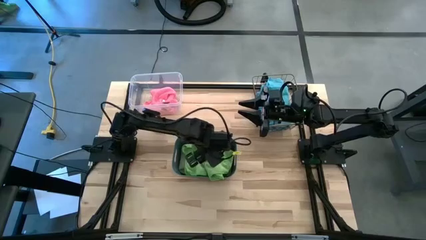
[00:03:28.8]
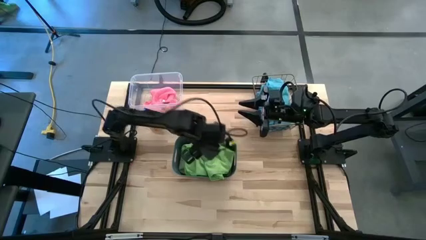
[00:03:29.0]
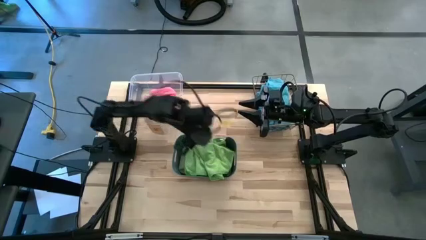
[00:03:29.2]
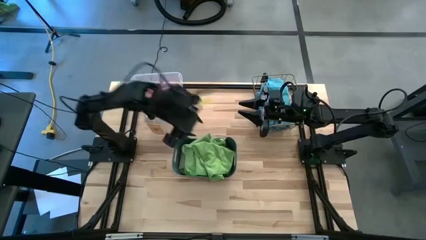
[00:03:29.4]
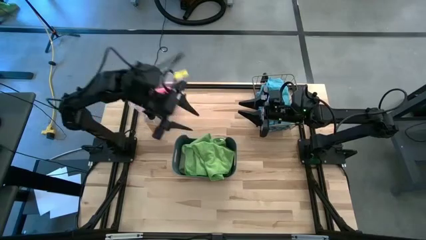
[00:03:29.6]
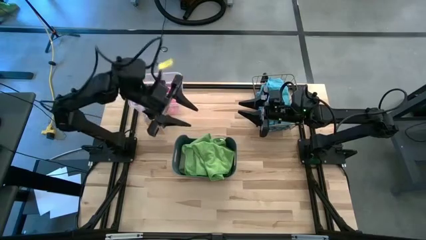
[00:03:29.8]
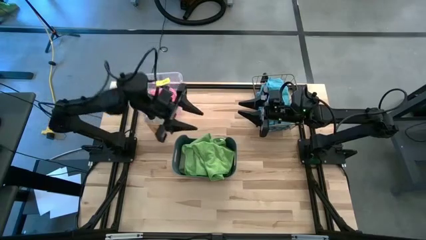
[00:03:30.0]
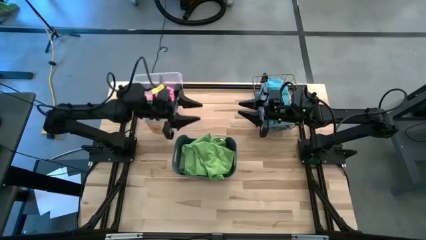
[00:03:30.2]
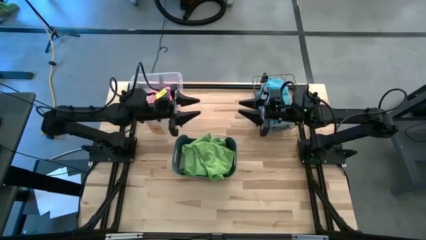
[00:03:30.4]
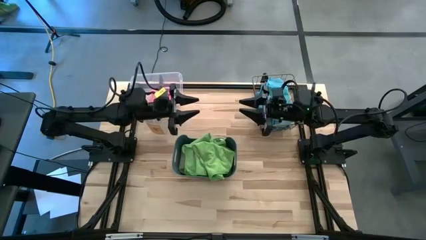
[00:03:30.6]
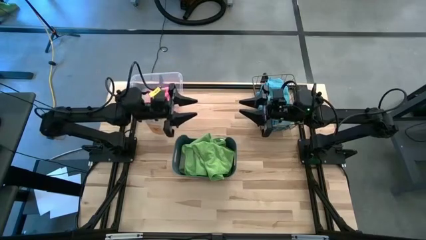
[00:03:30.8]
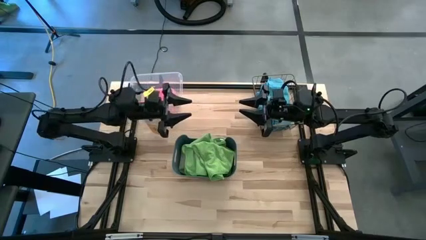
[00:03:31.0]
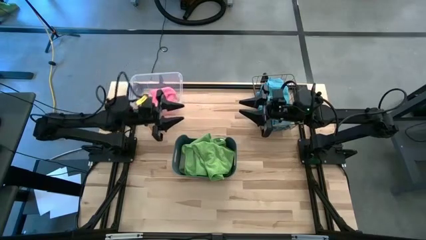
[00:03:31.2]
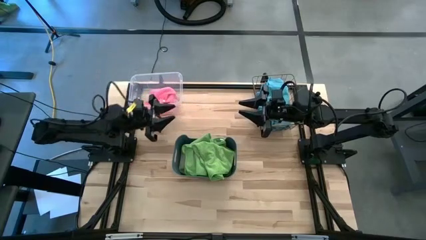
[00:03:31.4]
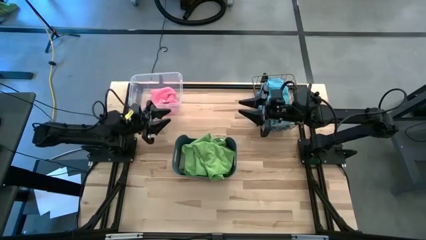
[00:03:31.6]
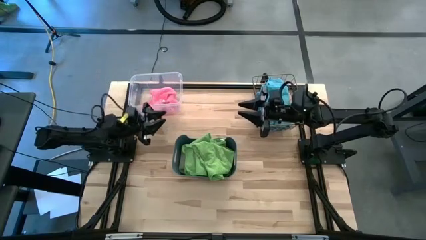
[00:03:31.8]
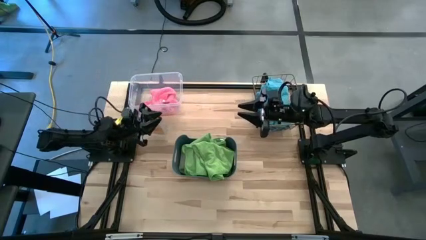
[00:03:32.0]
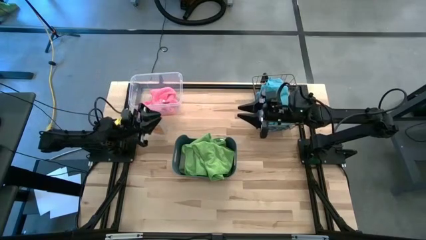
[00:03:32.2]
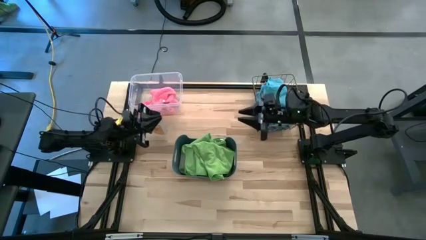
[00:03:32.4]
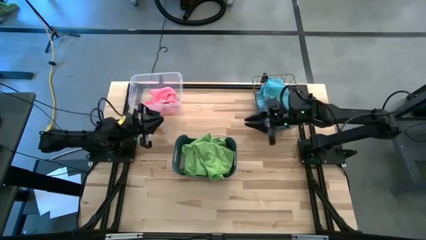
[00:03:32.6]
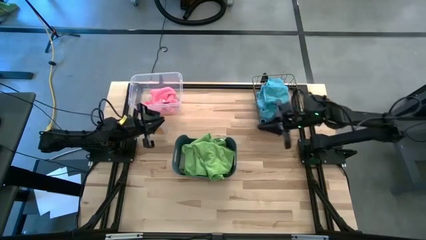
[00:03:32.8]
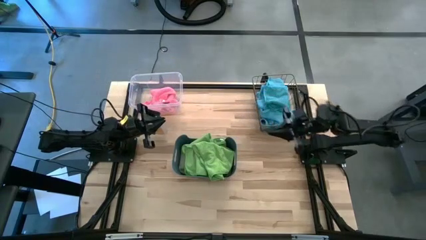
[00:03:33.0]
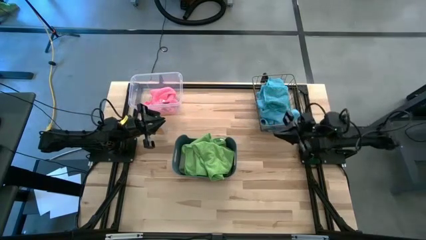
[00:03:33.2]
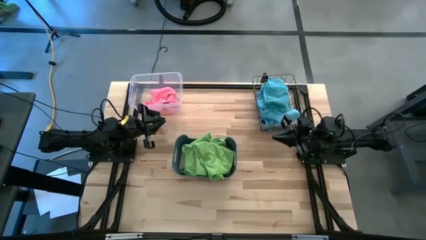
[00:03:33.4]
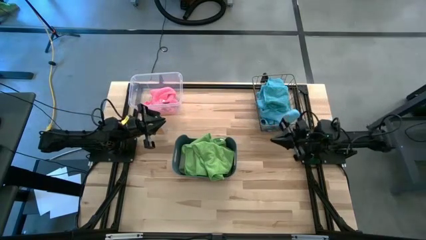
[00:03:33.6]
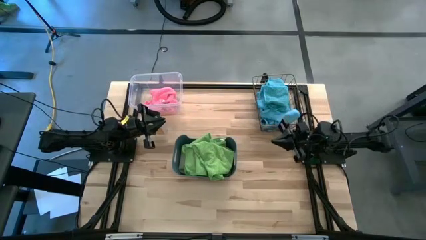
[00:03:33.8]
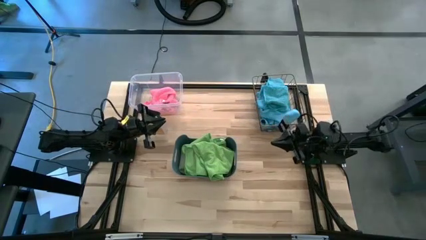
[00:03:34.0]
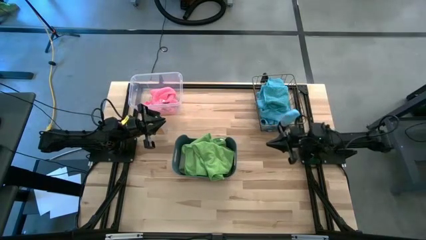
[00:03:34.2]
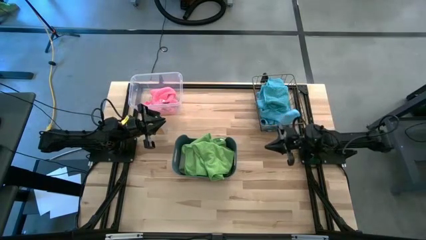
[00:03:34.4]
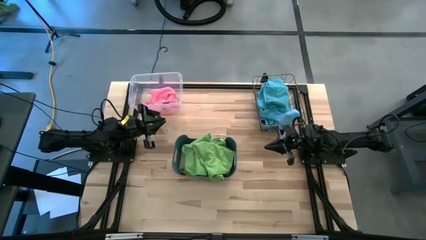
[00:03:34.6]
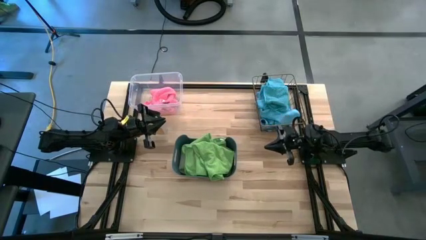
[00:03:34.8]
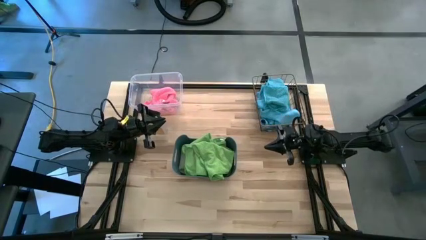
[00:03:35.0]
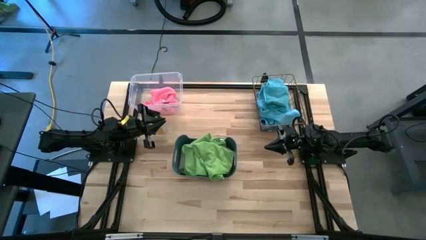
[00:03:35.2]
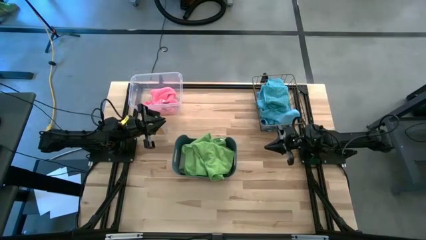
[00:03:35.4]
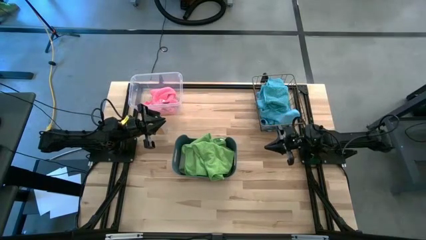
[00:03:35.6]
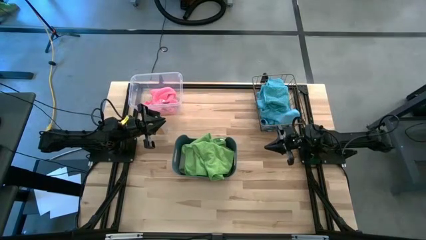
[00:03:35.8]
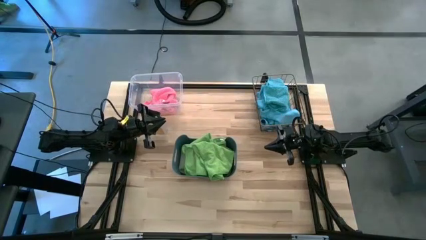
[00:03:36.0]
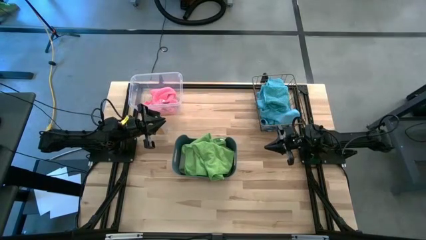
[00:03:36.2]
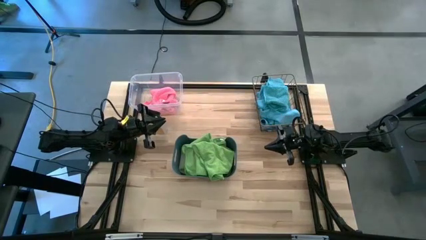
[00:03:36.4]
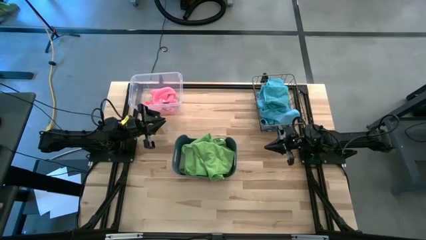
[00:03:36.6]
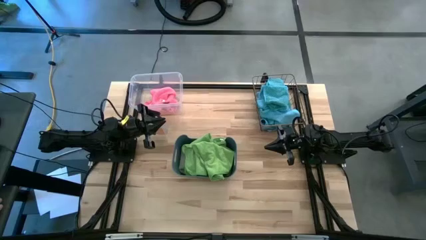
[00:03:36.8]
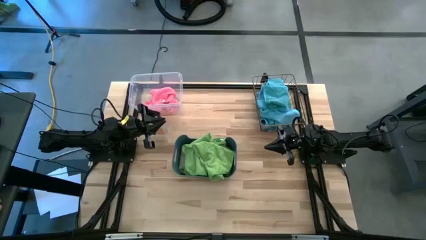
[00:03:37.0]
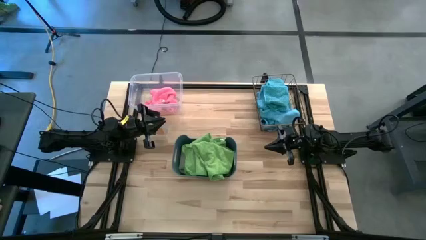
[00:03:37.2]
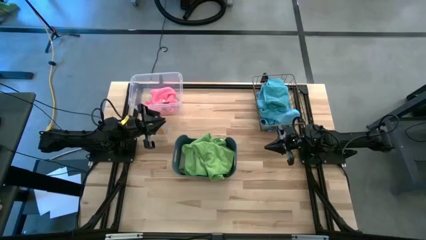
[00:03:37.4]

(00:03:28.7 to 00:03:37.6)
Task: Sort microfiber towel by color & place in baskets
Return to Home Position

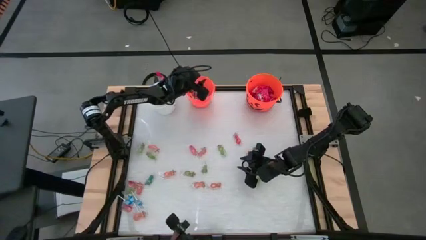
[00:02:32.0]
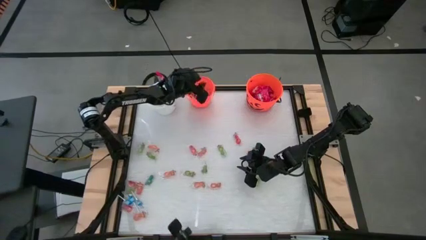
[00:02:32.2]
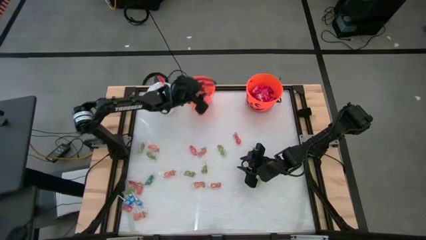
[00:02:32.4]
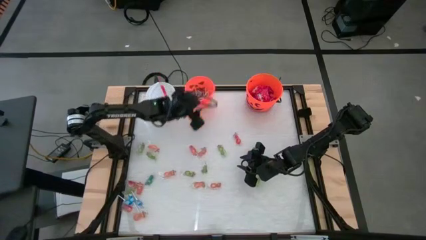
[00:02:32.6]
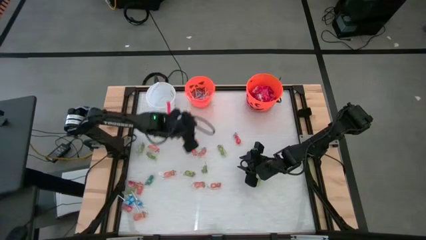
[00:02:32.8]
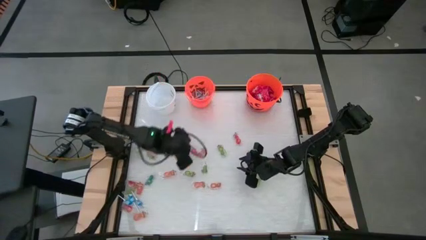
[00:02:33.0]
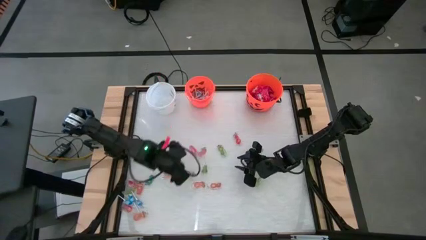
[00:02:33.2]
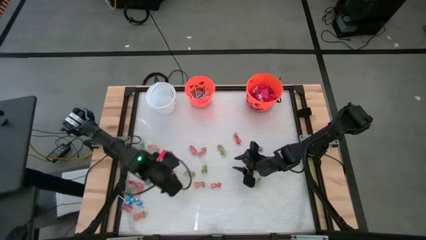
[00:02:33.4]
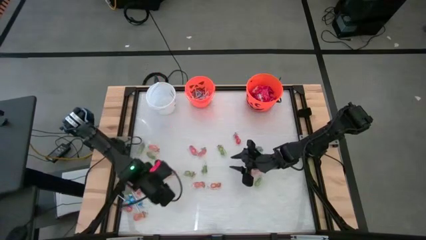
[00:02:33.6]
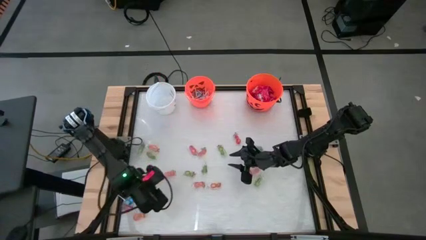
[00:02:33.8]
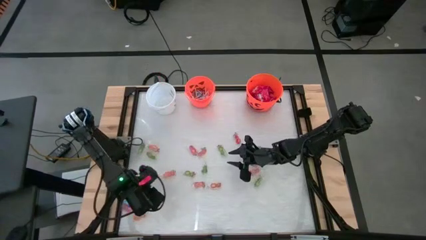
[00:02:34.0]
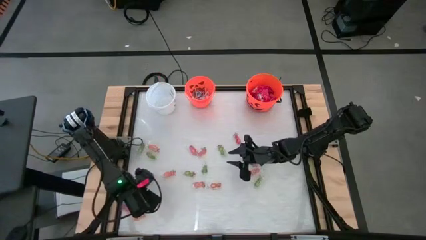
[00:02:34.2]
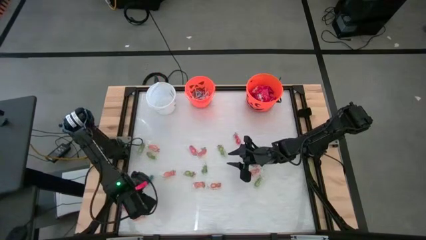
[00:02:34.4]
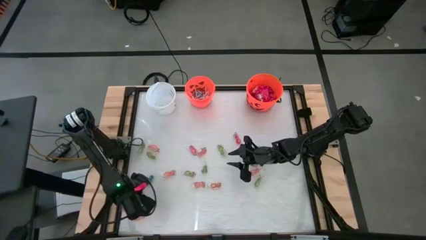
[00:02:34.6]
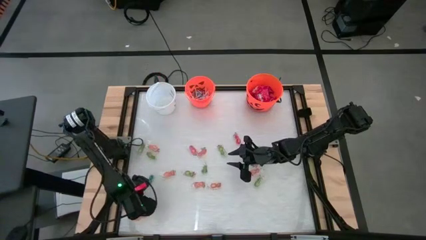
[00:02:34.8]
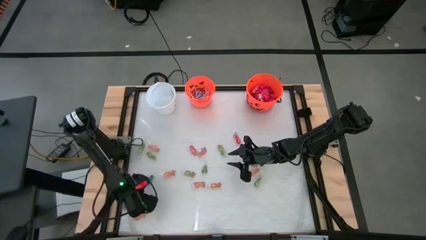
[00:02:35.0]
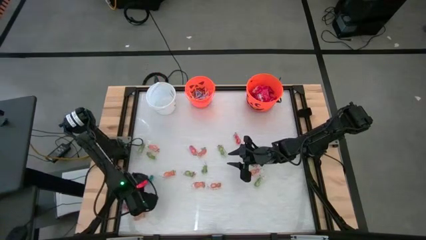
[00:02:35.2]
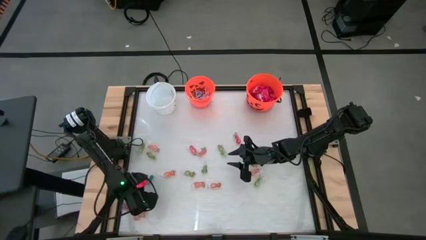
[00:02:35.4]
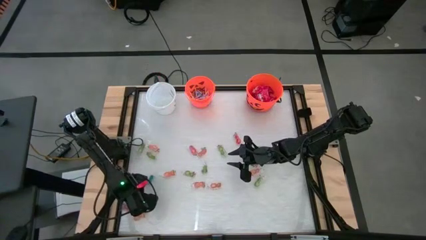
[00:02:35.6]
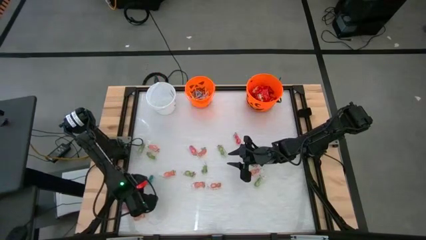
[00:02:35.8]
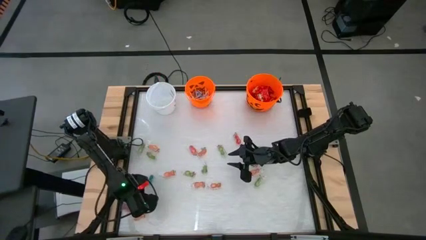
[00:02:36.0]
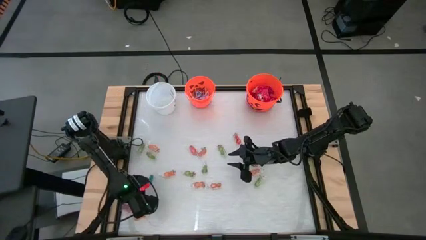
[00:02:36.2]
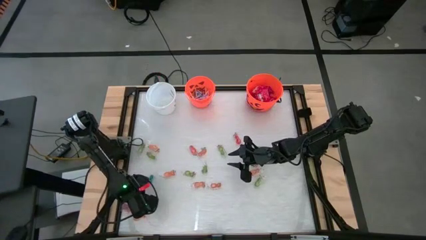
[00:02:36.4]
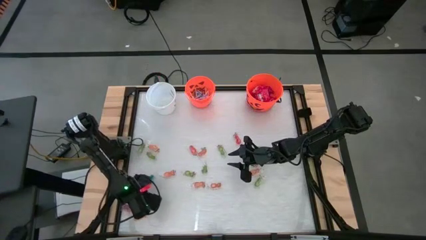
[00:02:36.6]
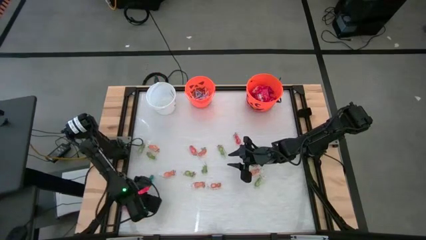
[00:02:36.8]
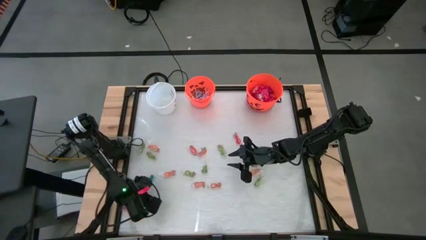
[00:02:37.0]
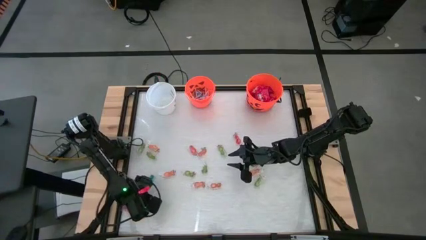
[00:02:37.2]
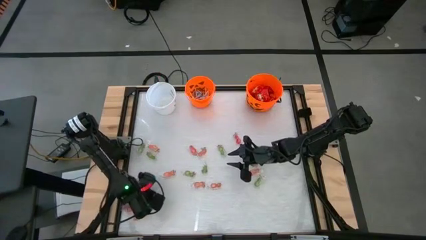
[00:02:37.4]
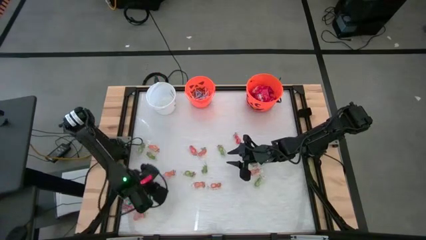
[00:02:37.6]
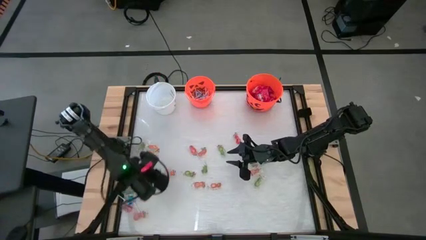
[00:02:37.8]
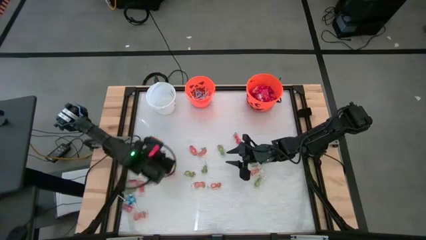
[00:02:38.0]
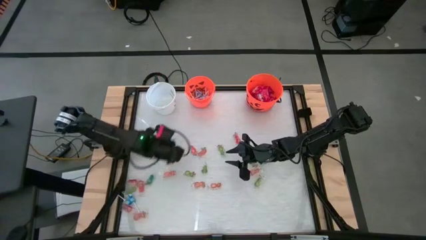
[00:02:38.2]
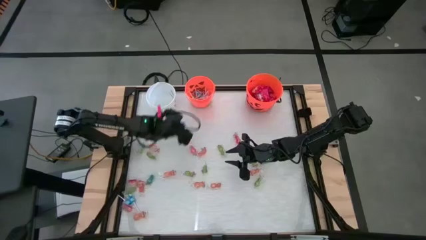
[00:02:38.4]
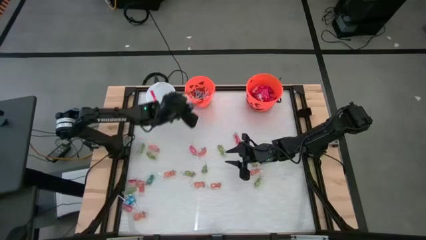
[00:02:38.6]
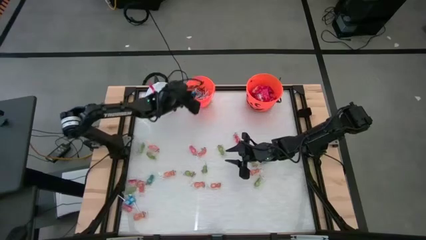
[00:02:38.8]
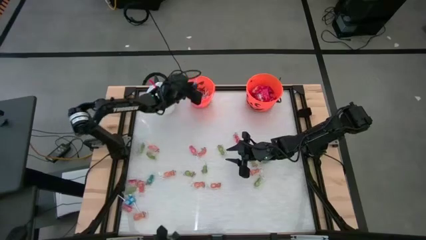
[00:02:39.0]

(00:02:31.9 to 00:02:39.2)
Task: Sort candy by brand, put in halloween buckets
Put the blue lollipop into the left orange bucket
